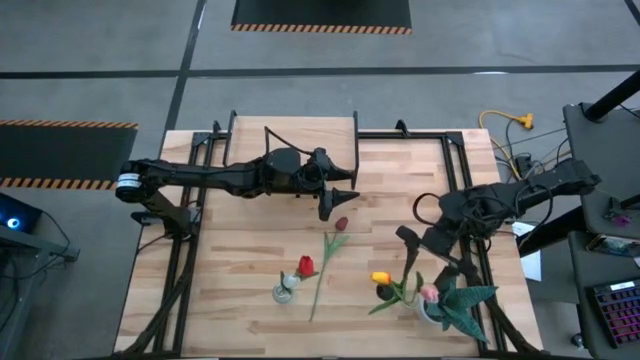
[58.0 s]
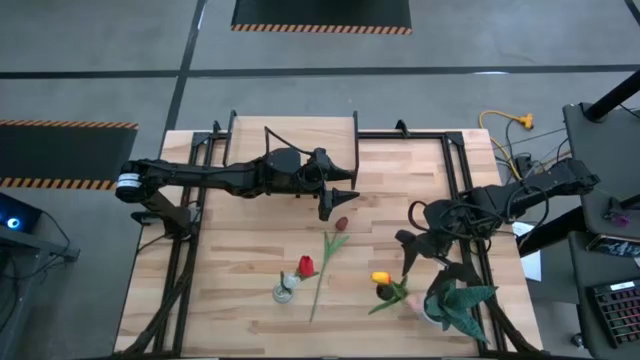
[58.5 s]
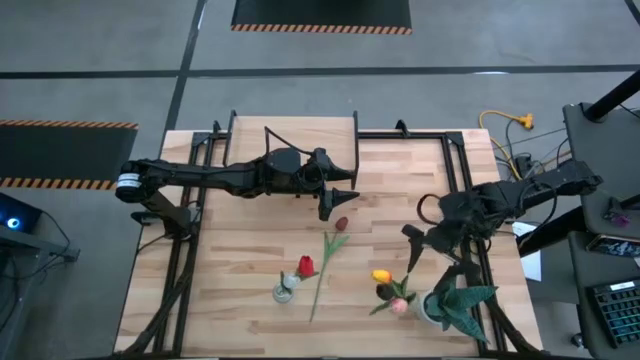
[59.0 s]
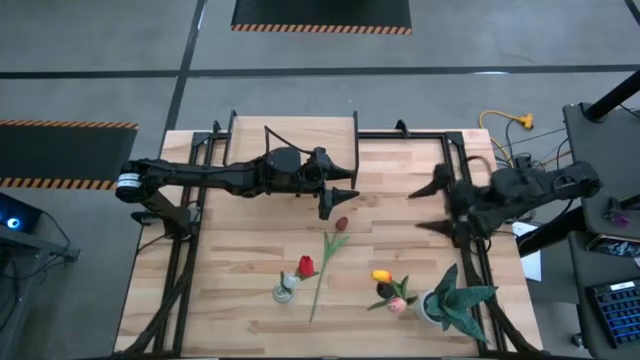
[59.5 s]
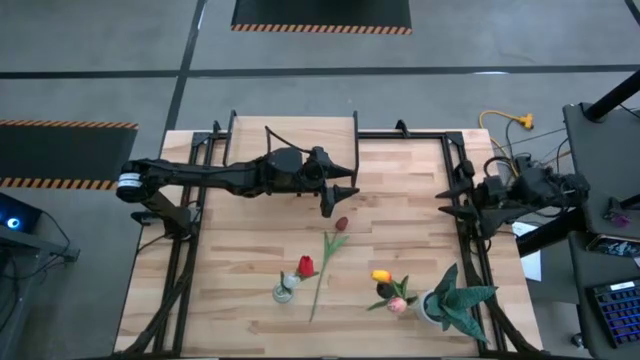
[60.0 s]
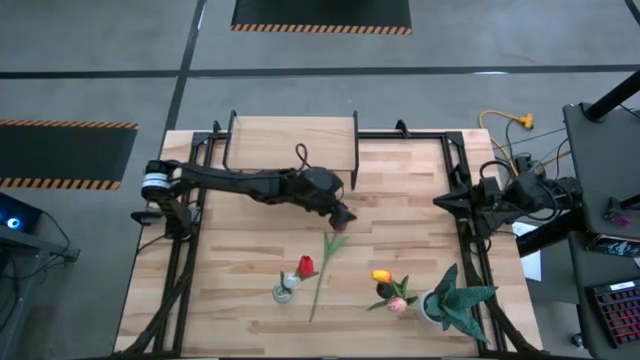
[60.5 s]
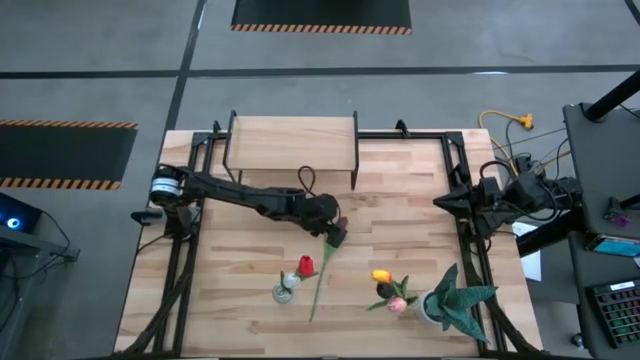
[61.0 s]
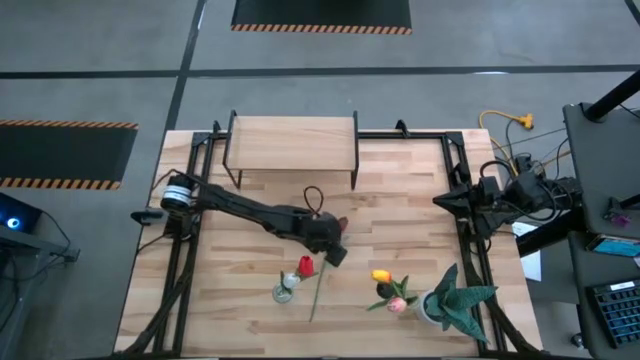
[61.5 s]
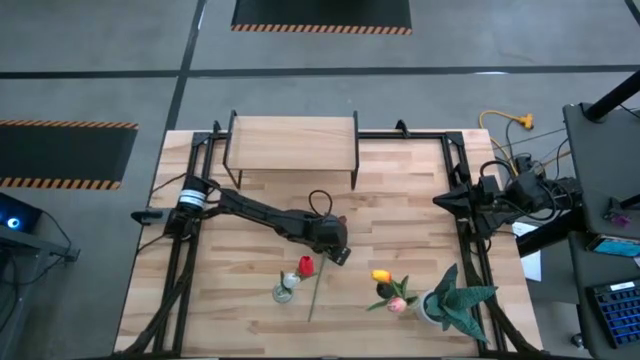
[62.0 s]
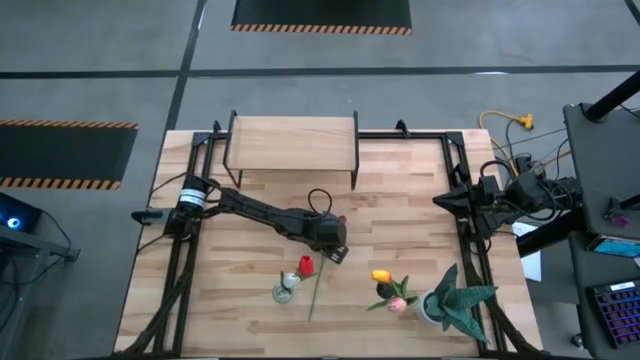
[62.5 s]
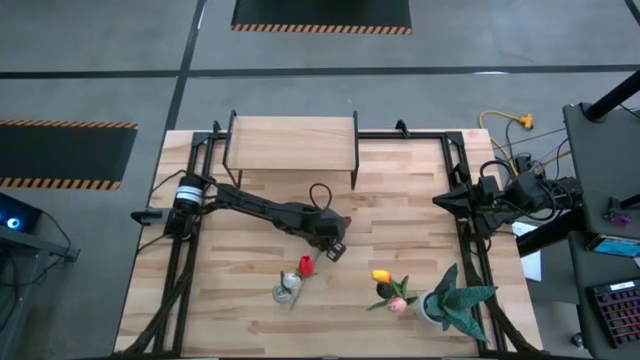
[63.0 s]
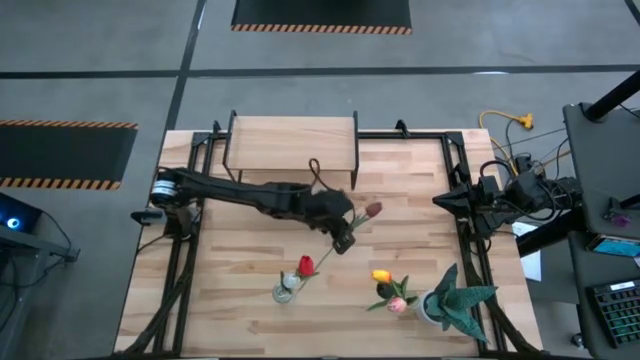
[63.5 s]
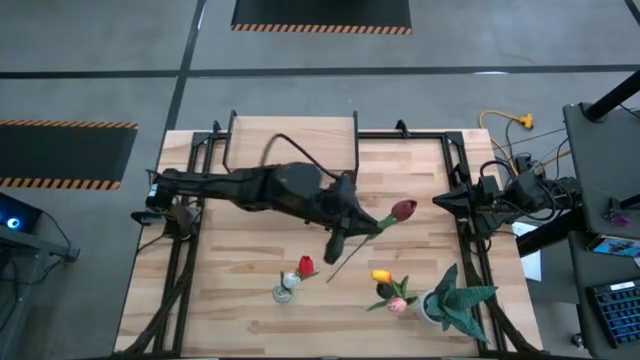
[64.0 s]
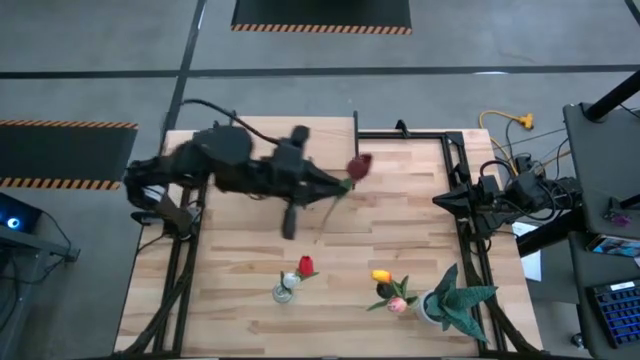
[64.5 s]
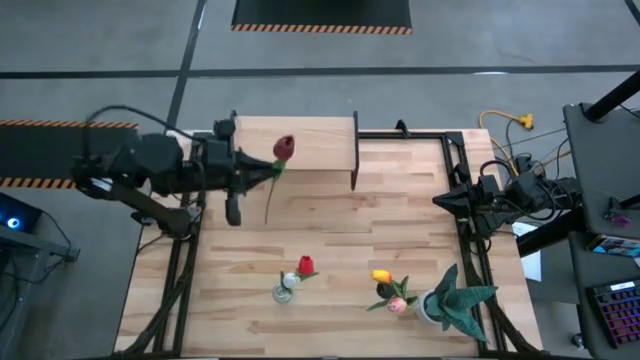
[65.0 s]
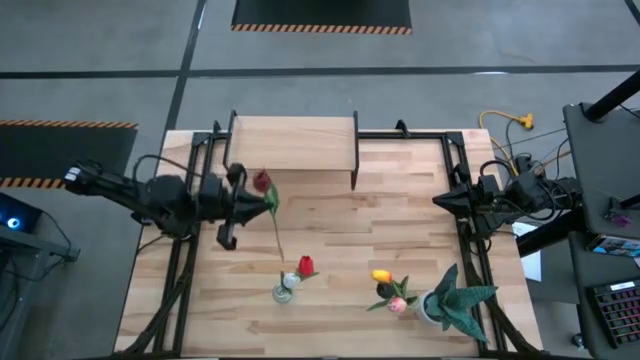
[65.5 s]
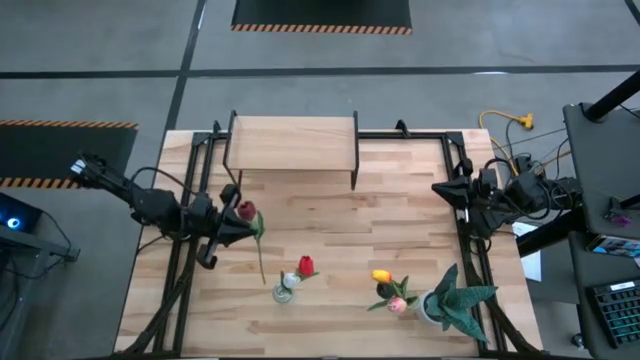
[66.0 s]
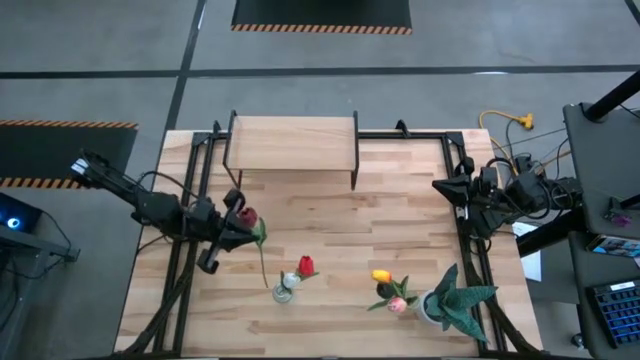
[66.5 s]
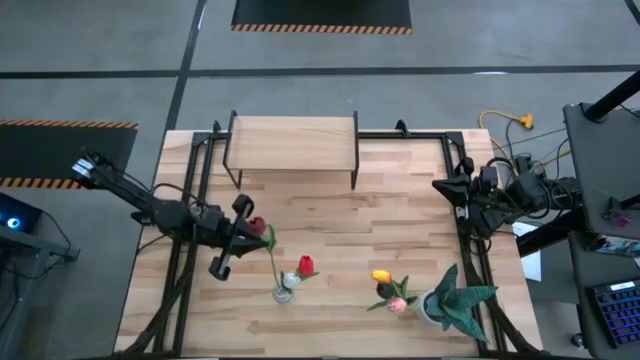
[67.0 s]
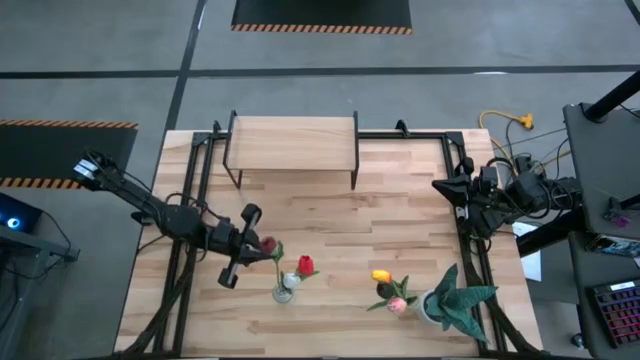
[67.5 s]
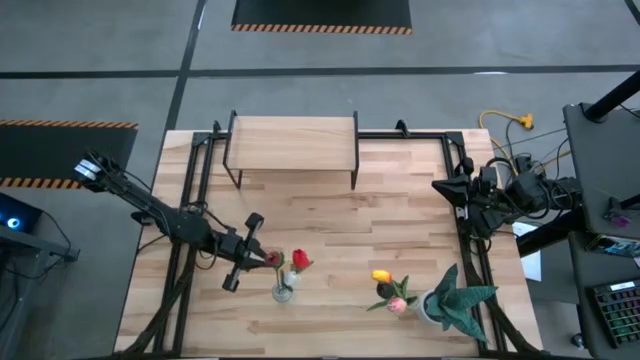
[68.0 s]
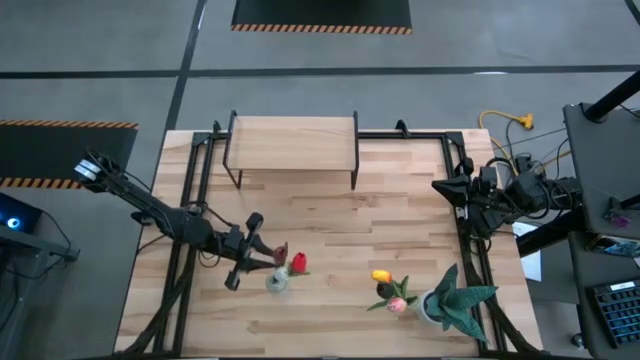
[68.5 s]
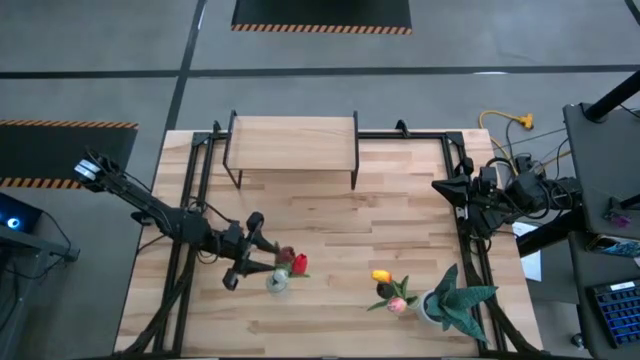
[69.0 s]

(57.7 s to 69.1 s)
Task: Pick and place flowers into a vace then onto a shelf
Put the dark red flower into the left transparent vase

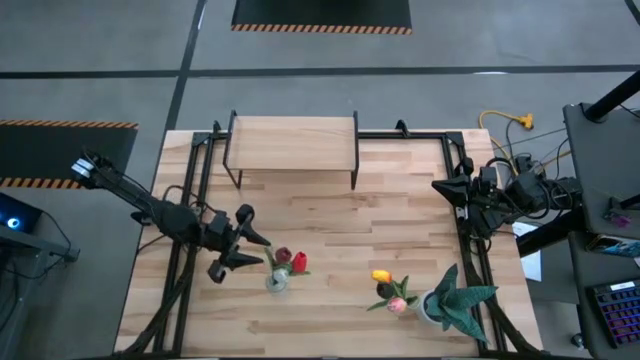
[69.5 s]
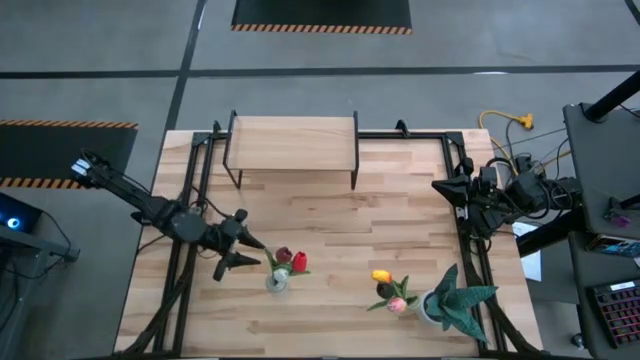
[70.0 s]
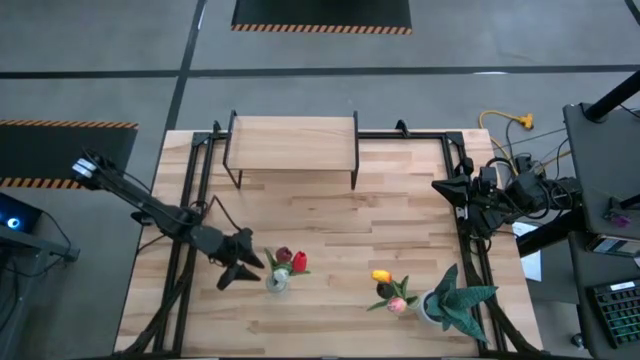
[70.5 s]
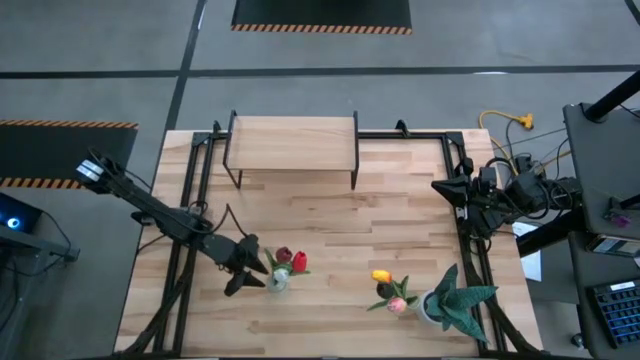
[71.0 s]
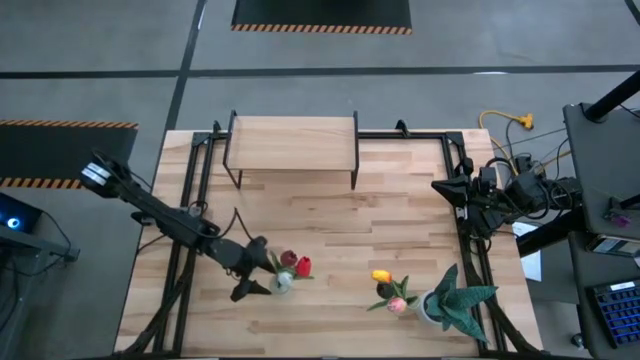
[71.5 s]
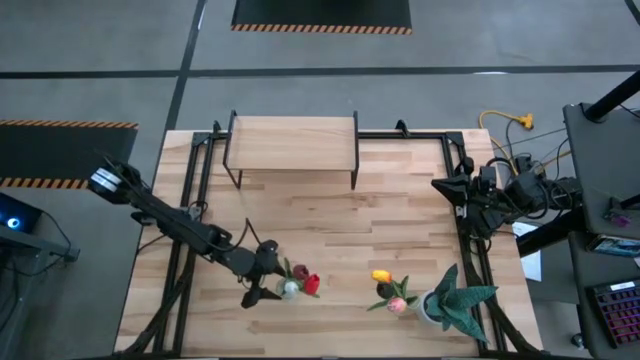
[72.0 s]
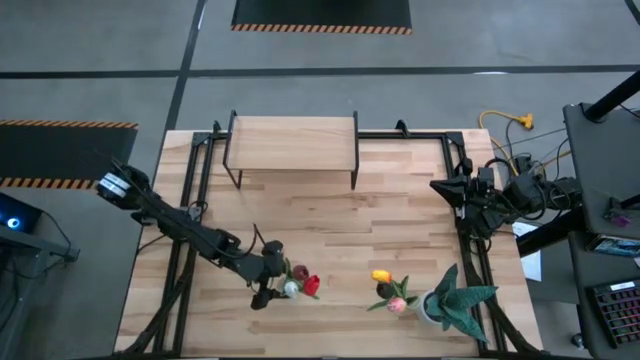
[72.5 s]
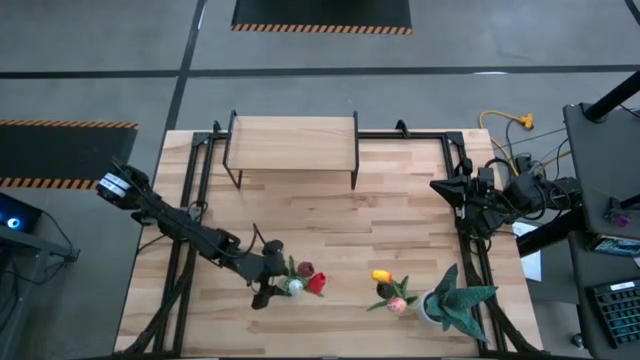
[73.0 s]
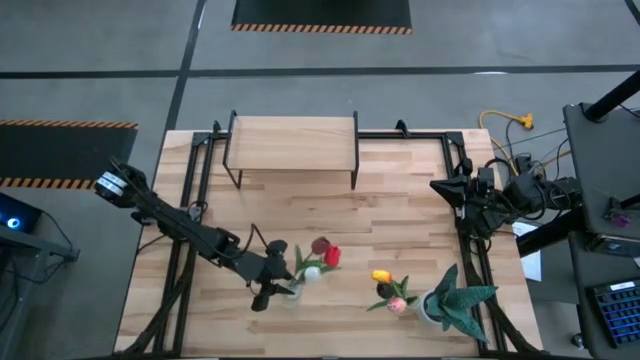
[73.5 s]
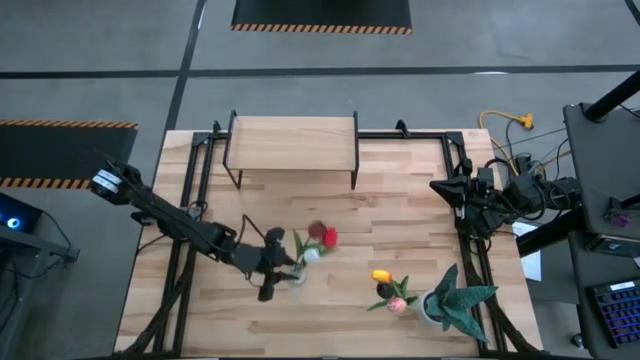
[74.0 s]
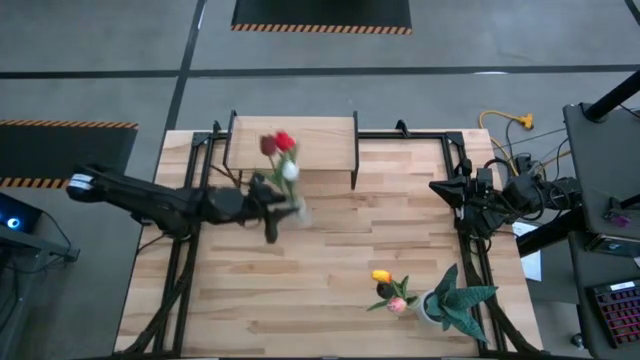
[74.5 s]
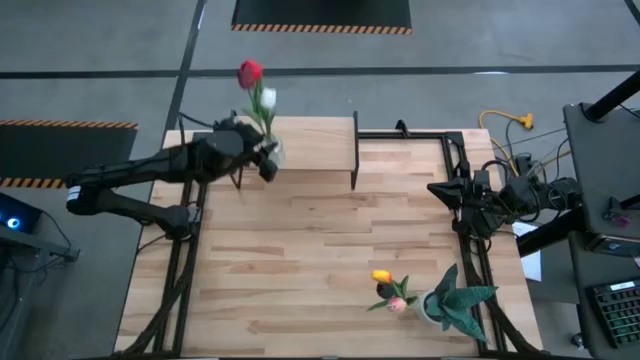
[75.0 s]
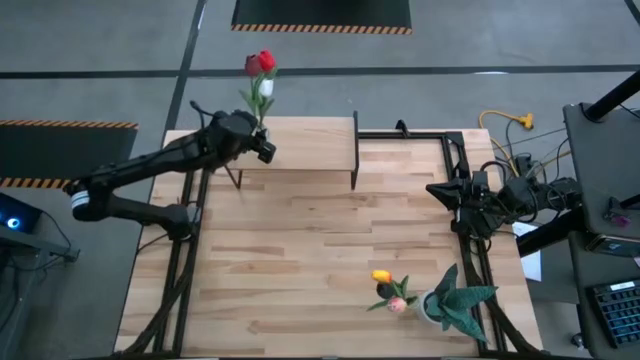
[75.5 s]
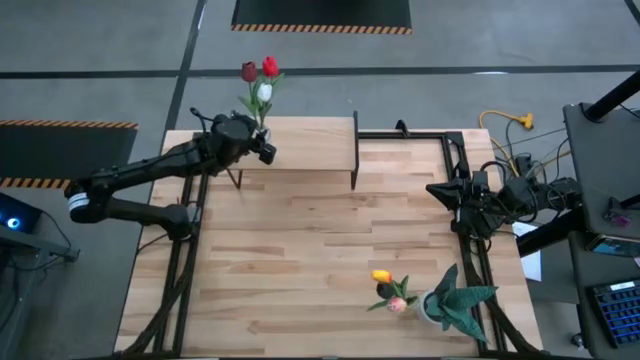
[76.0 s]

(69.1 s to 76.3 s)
Put the left transparent vase on the shelf

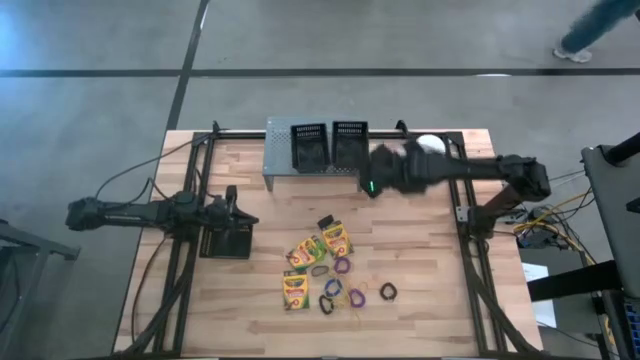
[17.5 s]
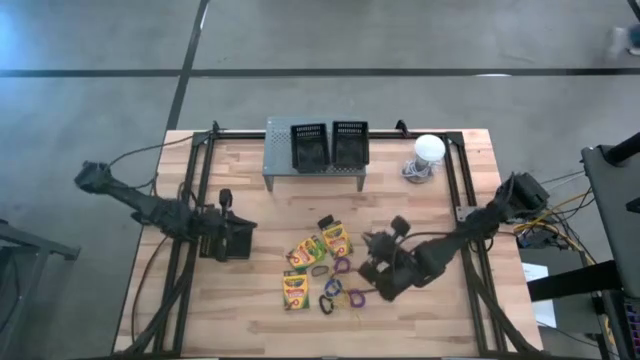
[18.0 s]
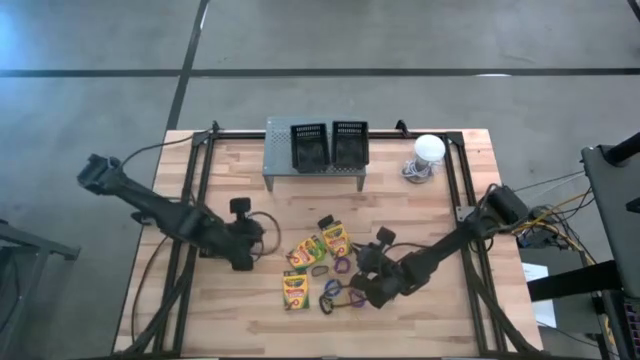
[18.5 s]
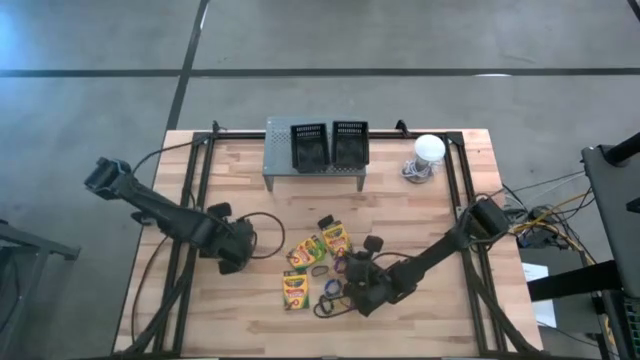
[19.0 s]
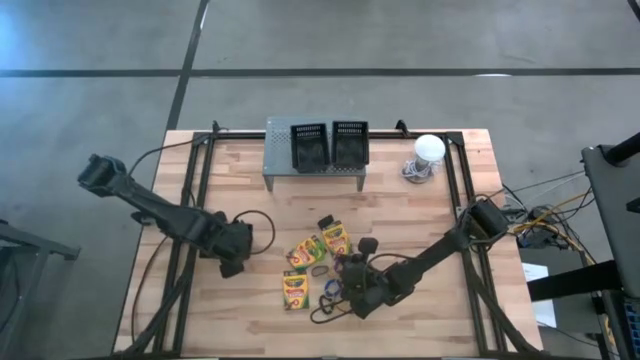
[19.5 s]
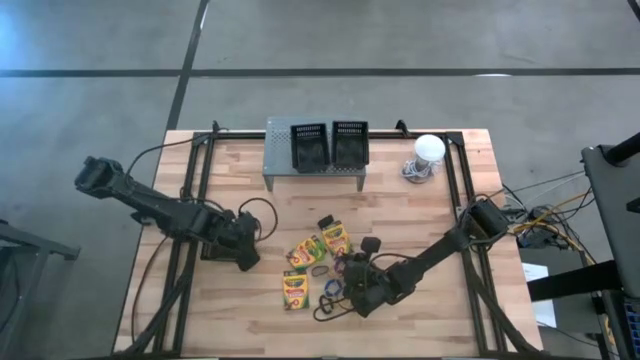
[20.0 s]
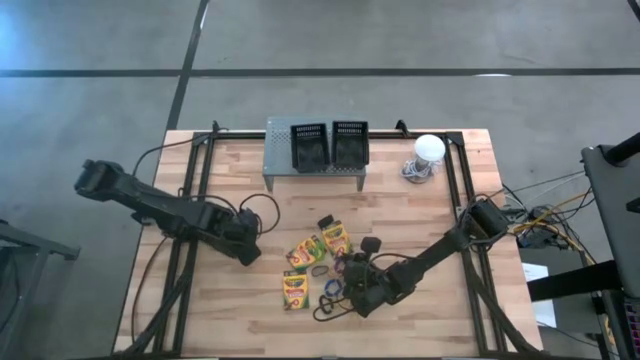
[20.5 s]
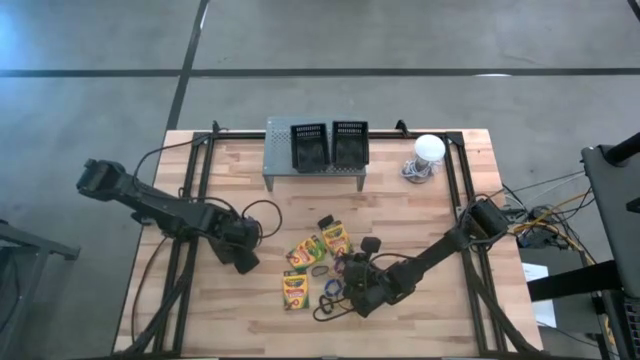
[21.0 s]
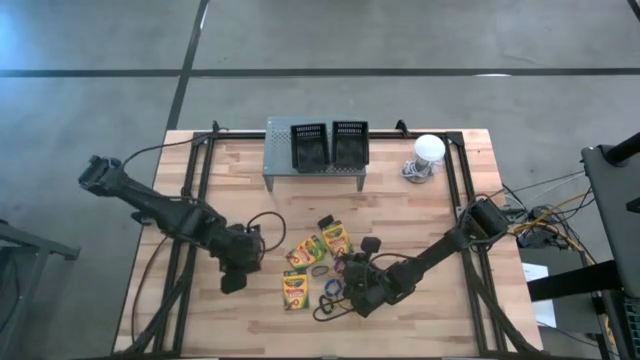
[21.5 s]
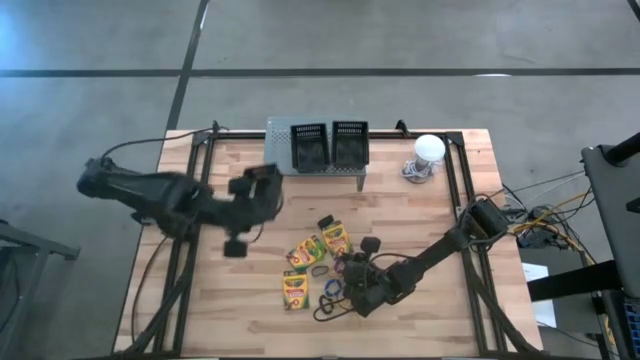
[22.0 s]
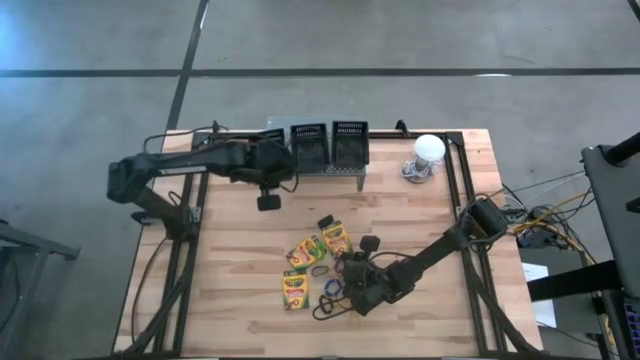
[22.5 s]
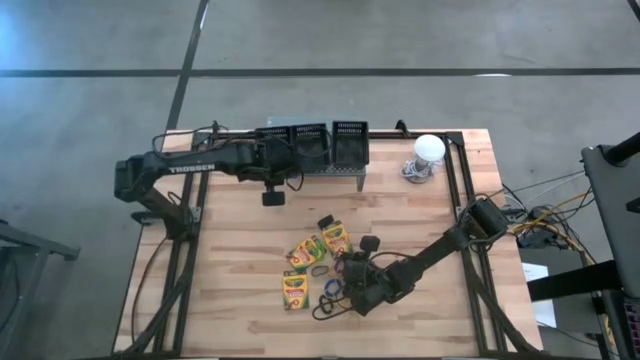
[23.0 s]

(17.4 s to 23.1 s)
Task: Pick & Place Office Desk Supplies
Put the black bin on the shelf
